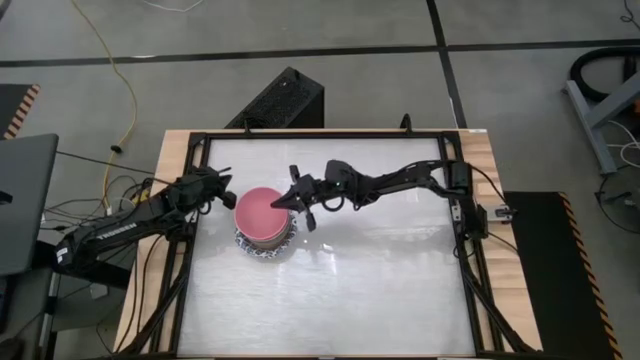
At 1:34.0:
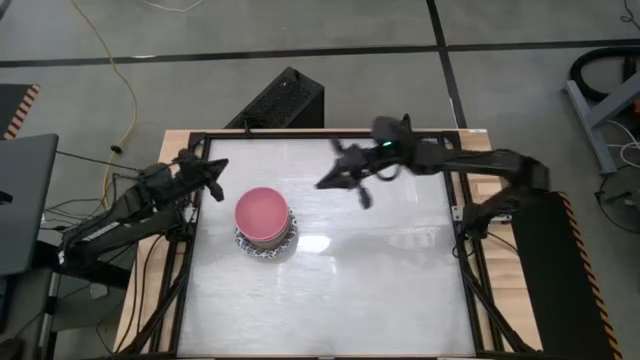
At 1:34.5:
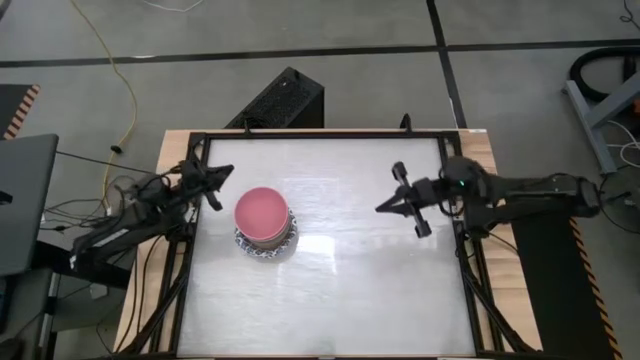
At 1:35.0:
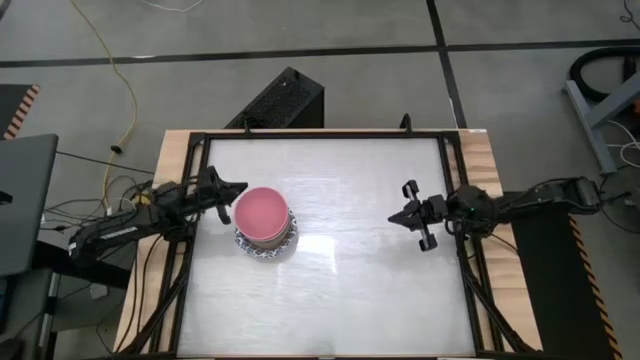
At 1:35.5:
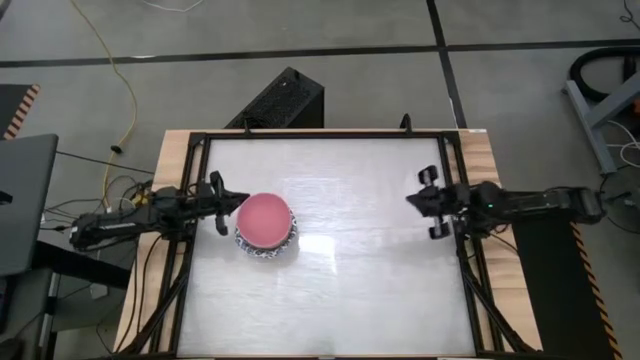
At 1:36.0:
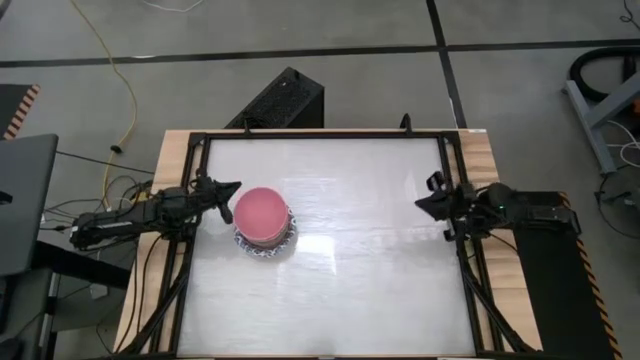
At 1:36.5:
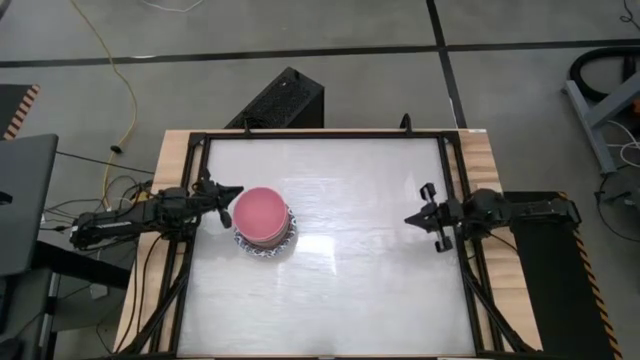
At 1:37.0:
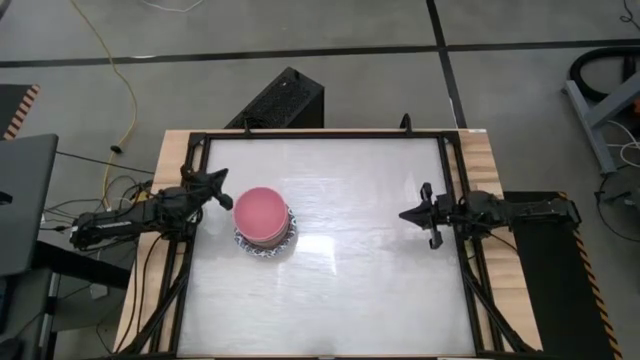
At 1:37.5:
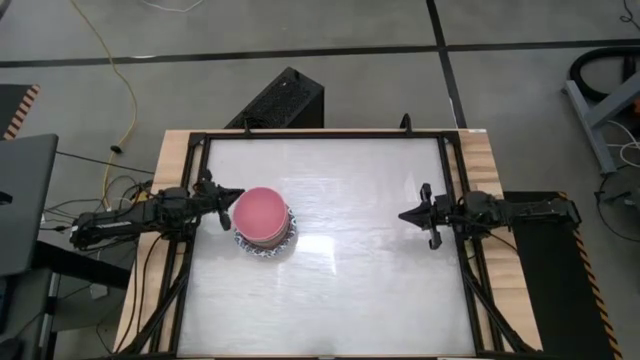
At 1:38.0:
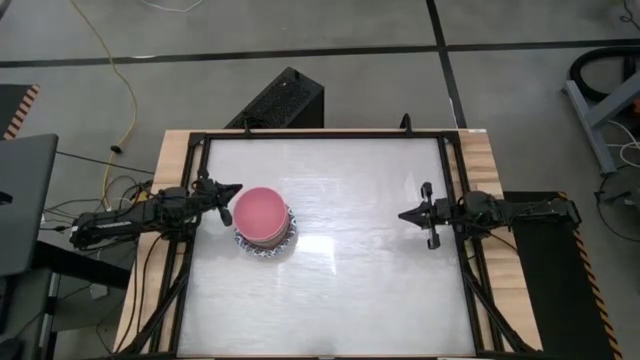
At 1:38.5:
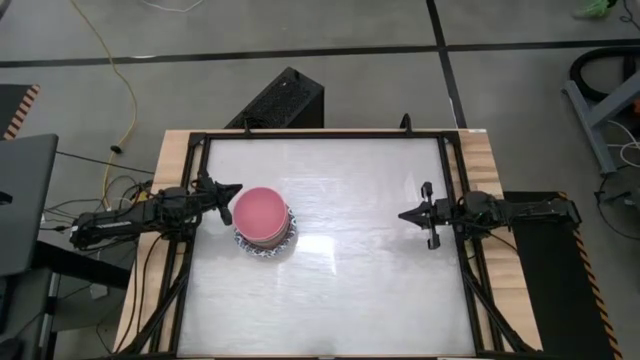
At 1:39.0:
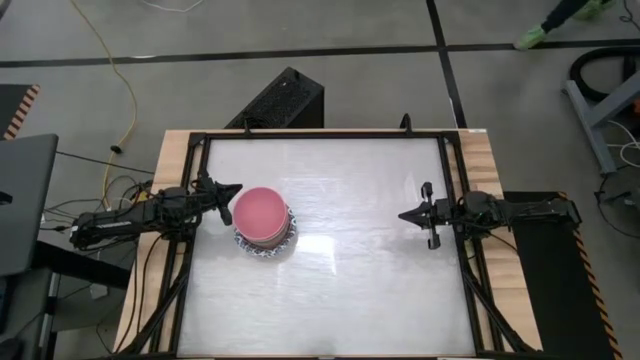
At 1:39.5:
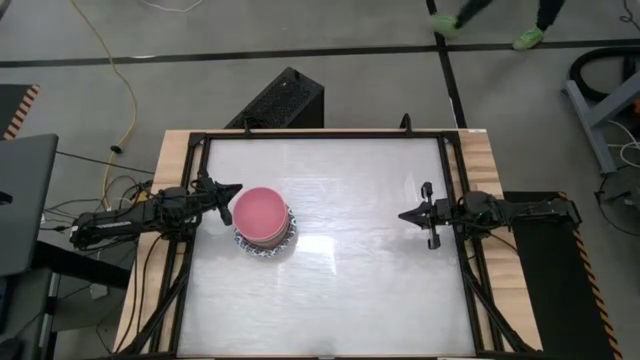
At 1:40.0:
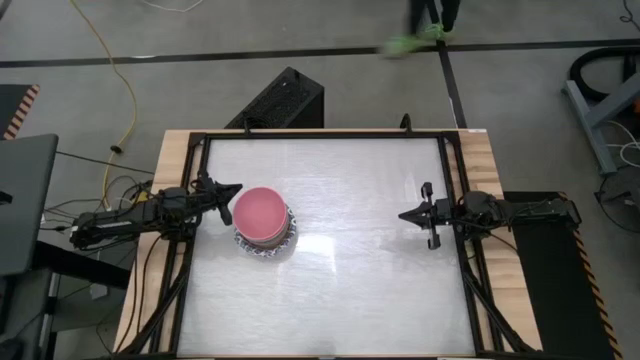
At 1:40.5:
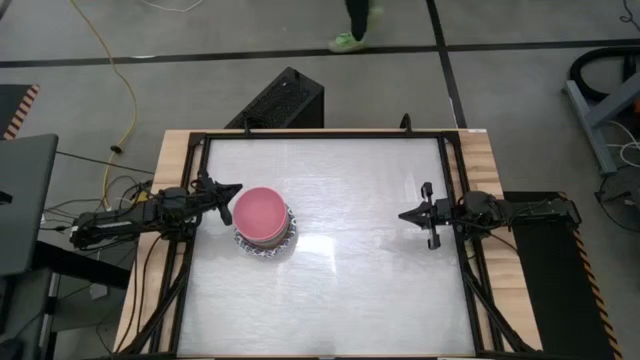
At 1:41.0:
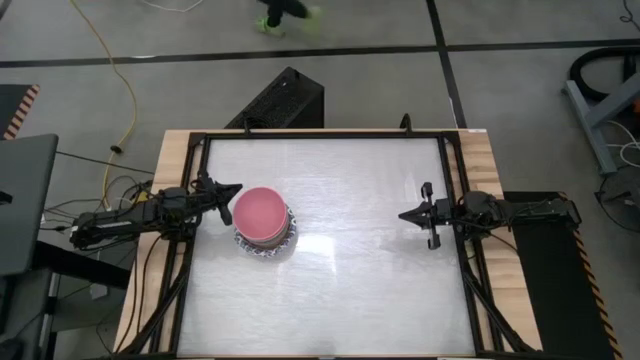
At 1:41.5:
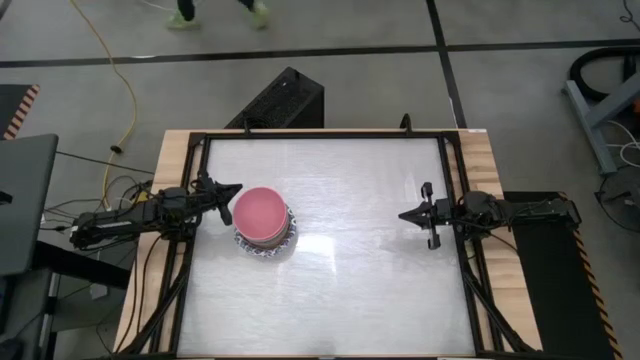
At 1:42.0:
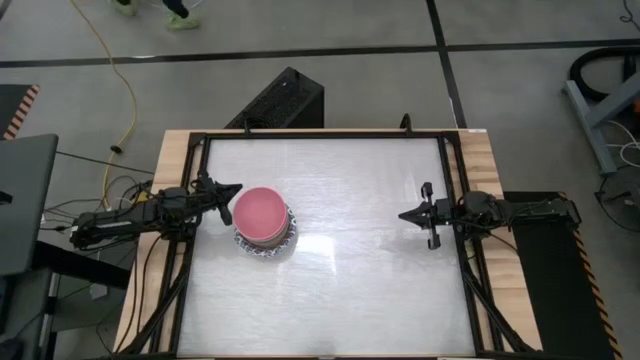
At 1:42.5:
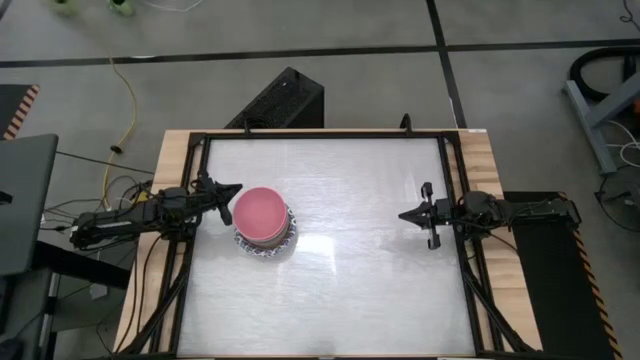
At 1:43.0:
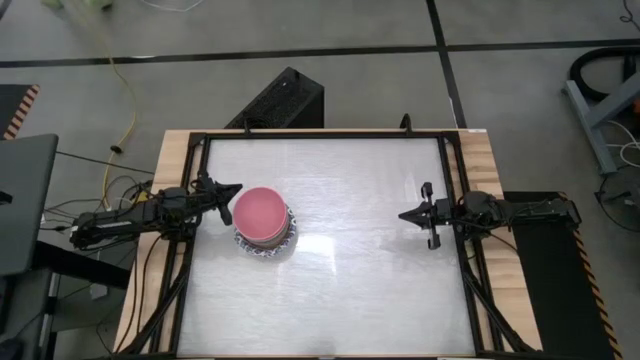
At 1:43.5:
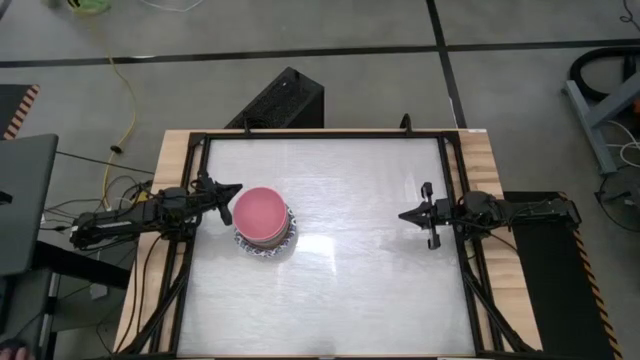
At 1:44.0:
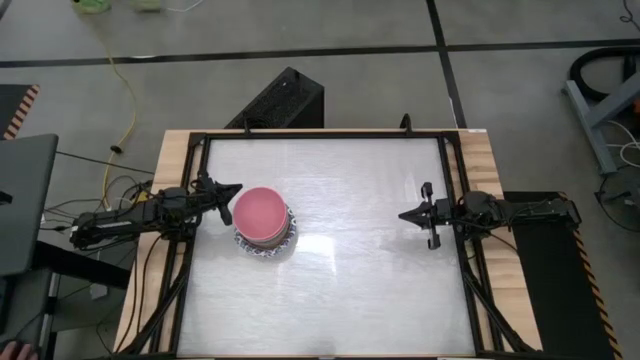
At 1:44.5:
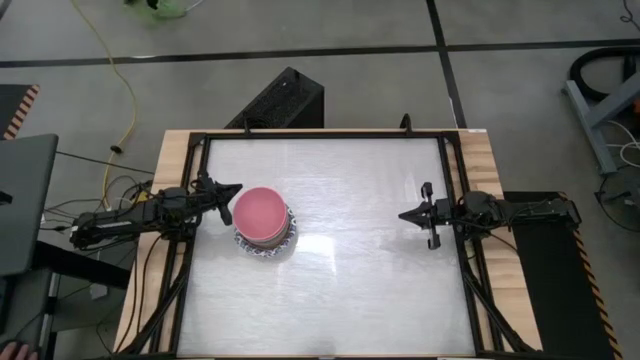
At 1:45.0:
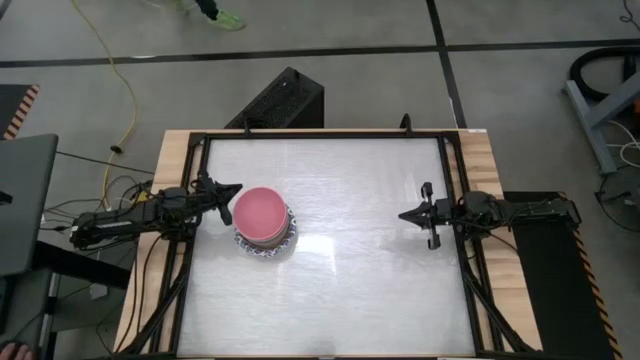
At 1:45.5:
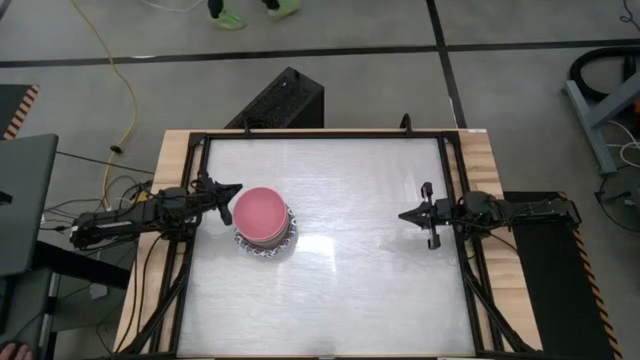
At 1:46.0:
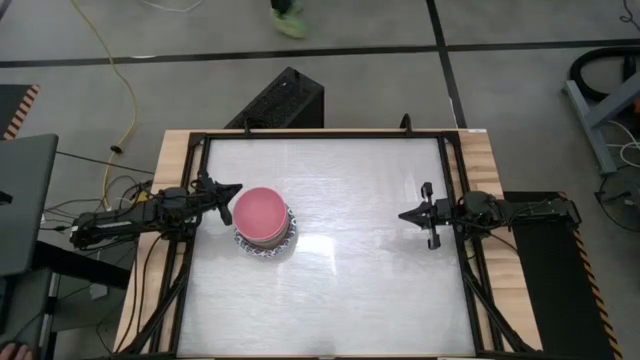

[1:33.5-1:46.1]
Return to Home Position
